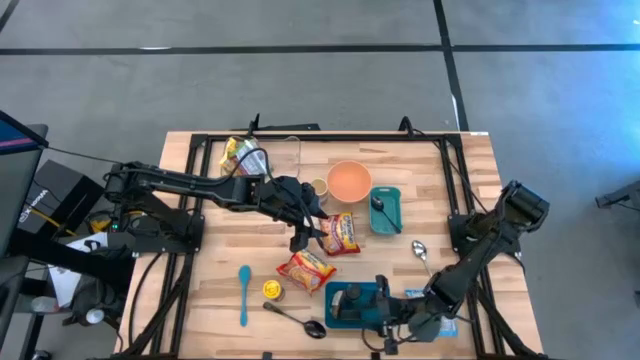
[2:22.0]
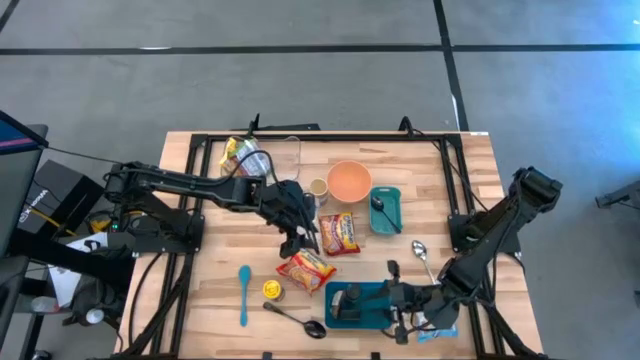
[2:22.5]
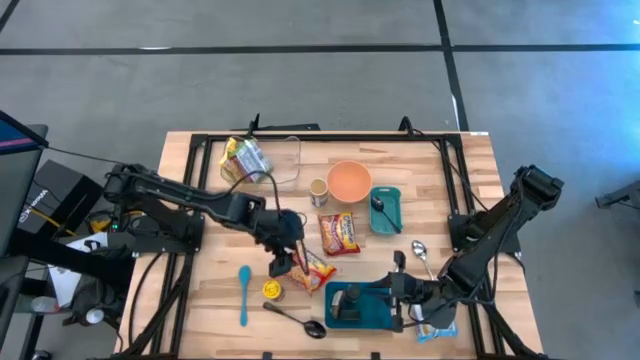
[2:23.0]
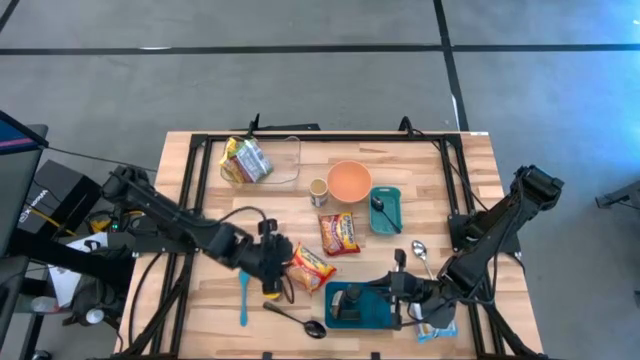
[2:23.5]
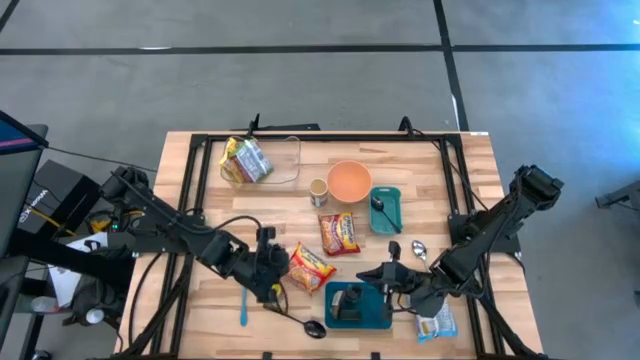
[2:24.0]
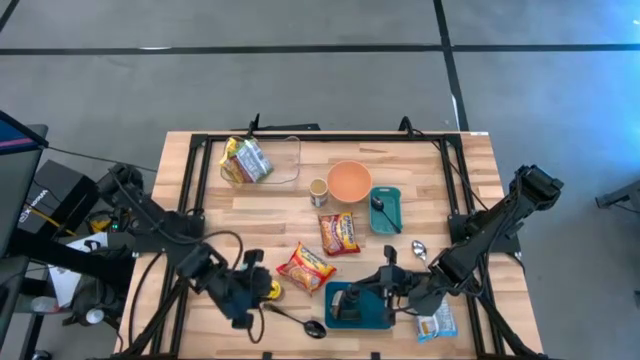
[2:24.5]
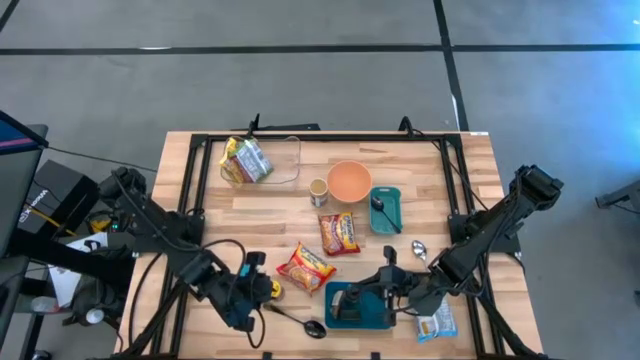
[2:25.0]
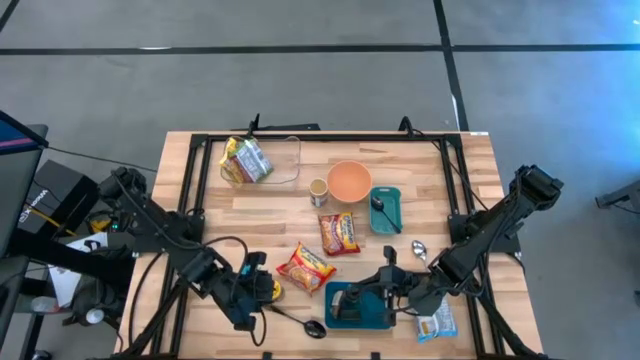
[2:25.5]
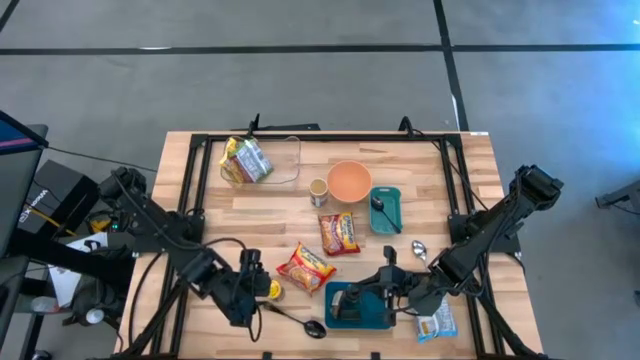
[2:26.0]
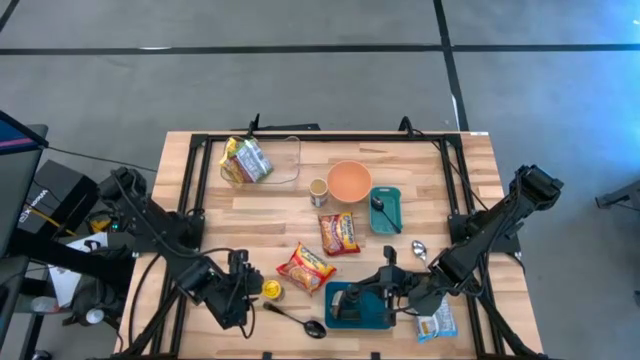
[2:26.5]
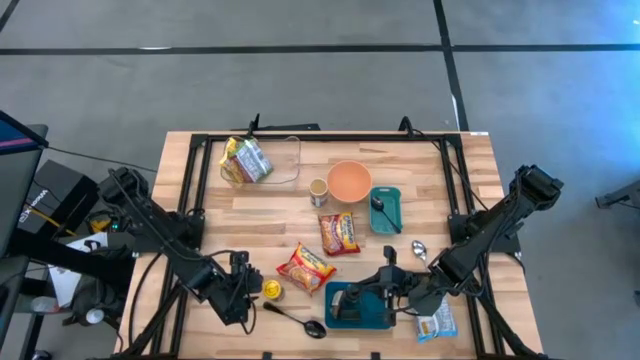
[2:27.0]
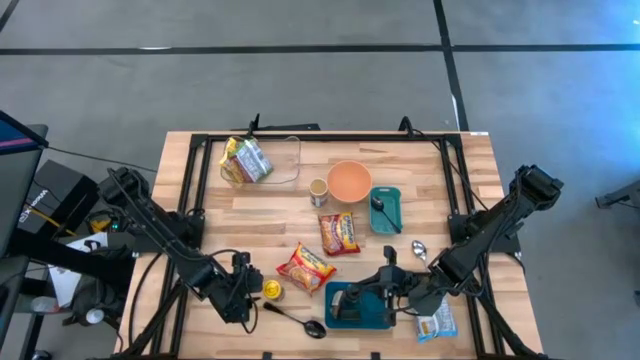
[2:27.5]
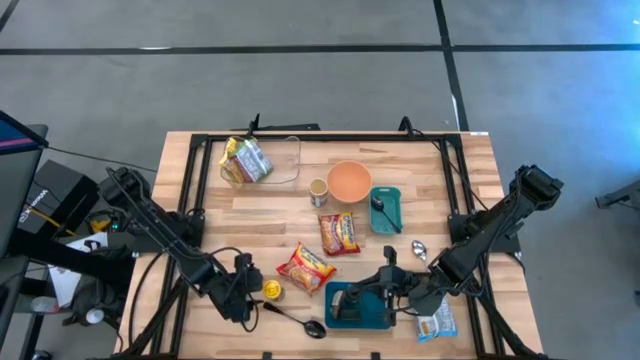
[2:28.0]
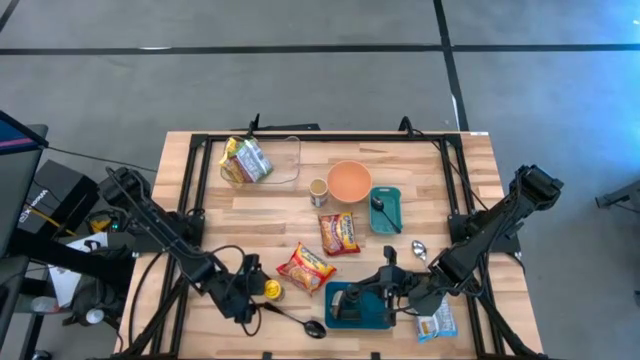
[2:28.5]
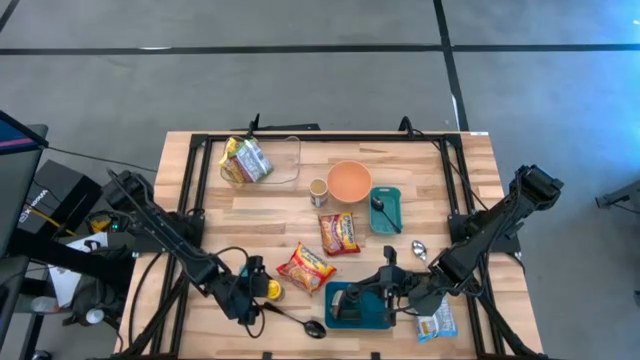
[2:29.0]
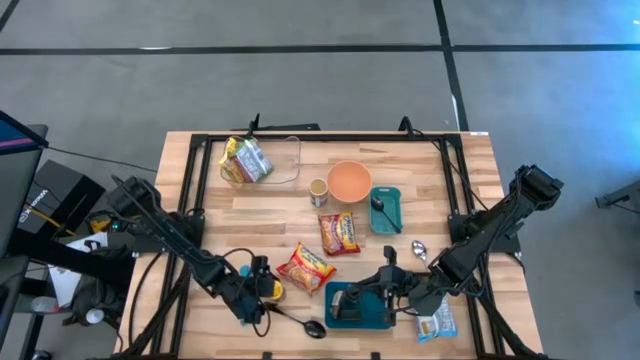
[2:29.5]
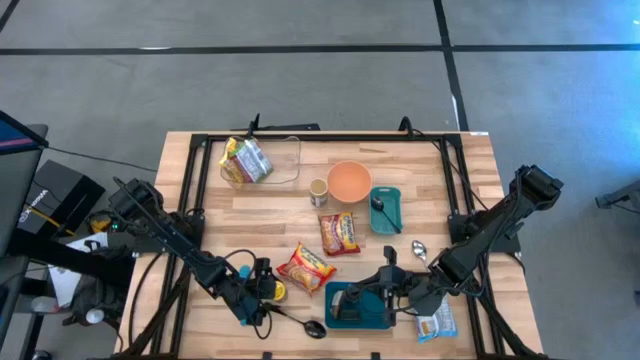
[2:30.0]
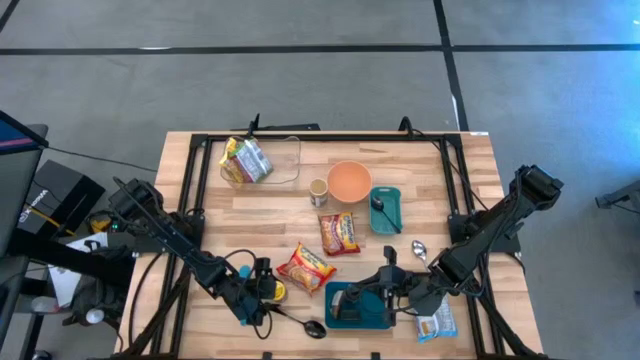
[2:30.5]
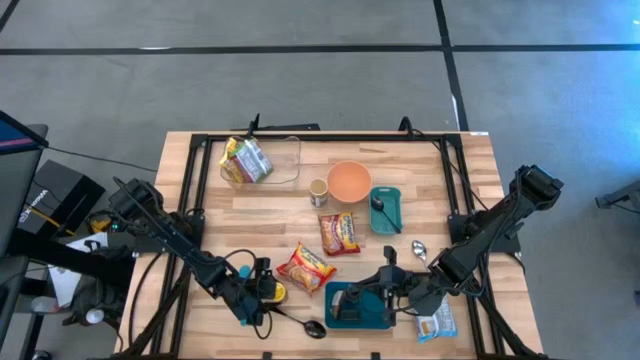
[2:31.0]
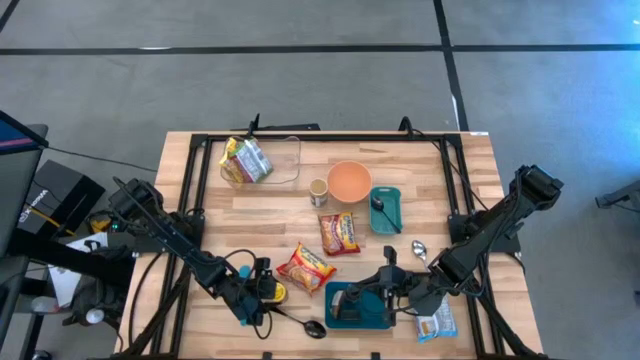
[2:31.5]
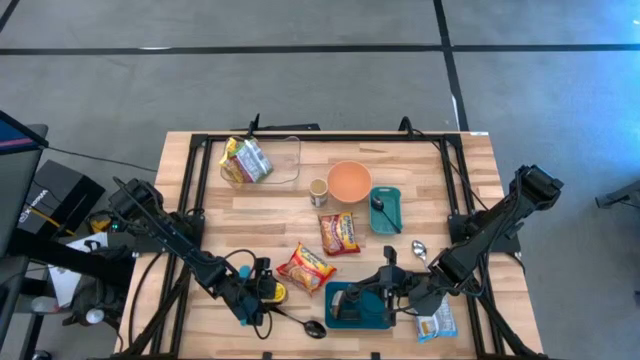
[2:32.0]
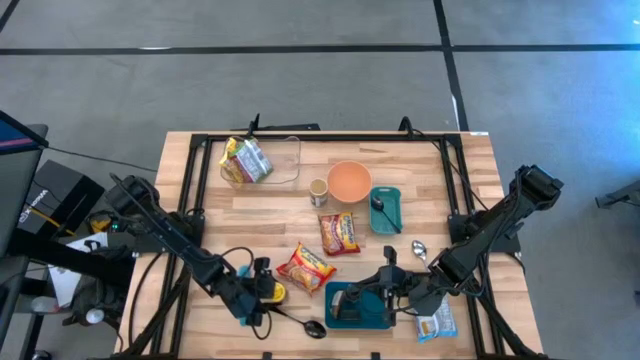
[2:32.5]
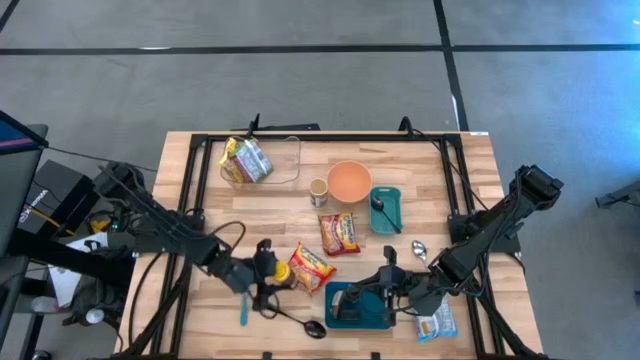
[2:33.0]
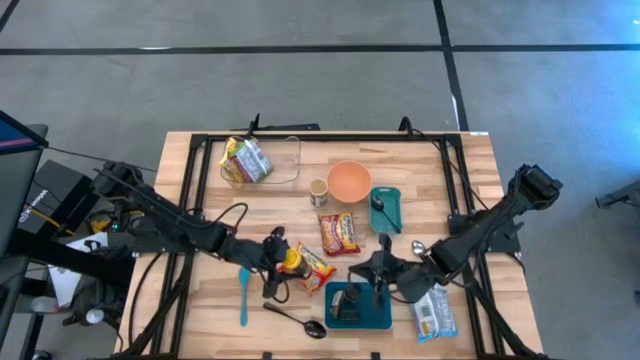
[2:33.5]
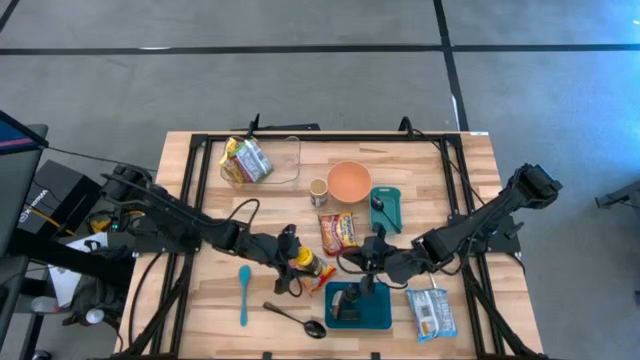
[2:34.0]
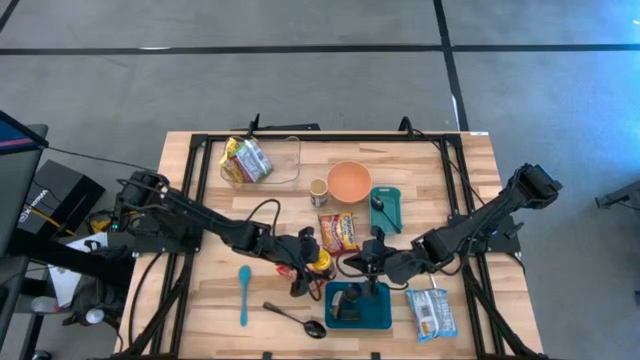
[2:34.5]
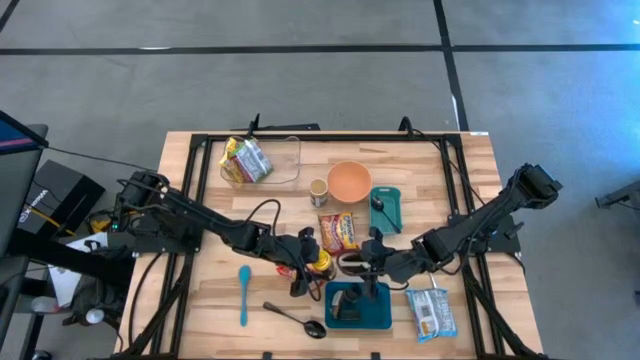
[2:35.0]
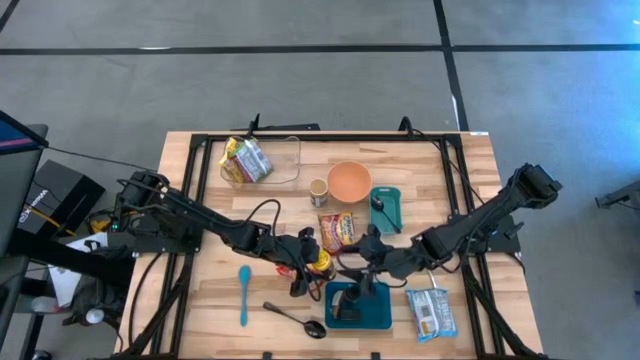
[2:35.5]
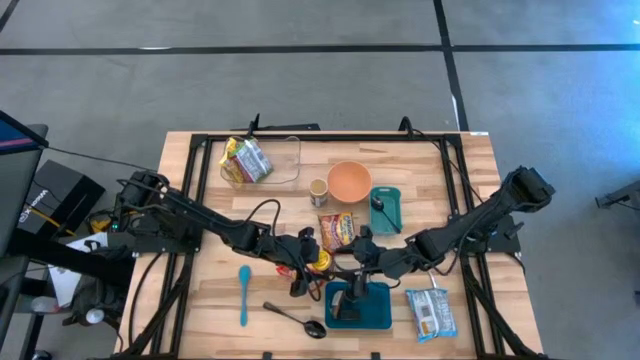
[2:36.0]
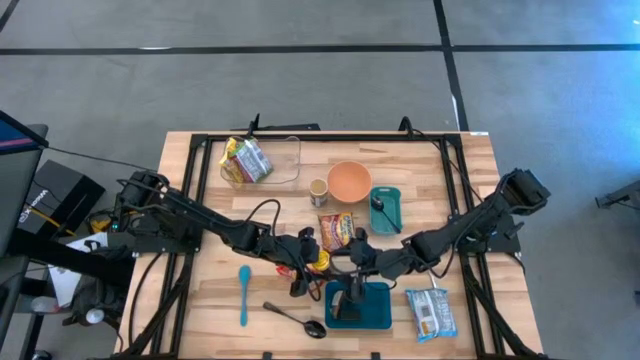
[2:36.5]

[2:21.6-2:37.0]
Task: Pick & Place Food Item
Put the yellow seasoning bottle into the blue bin

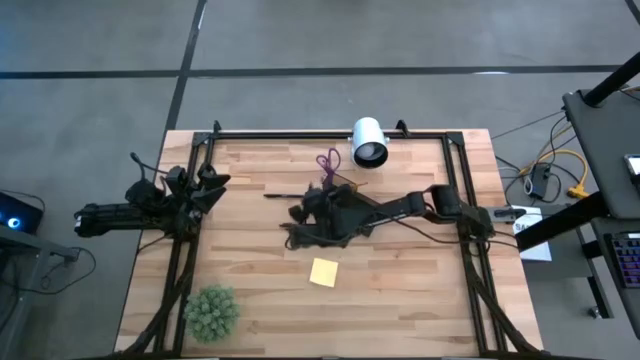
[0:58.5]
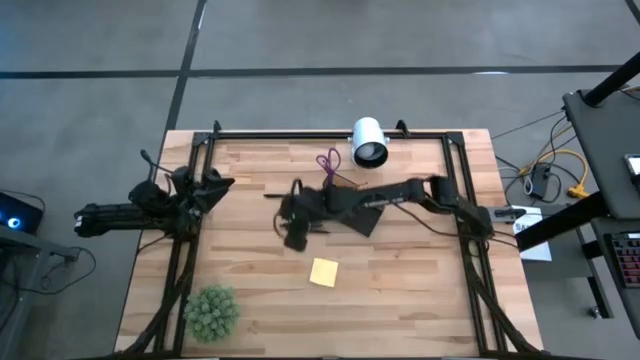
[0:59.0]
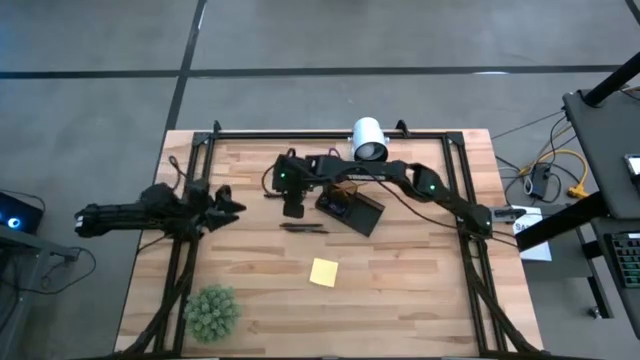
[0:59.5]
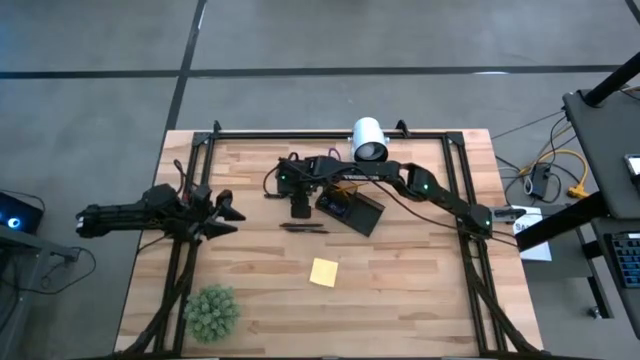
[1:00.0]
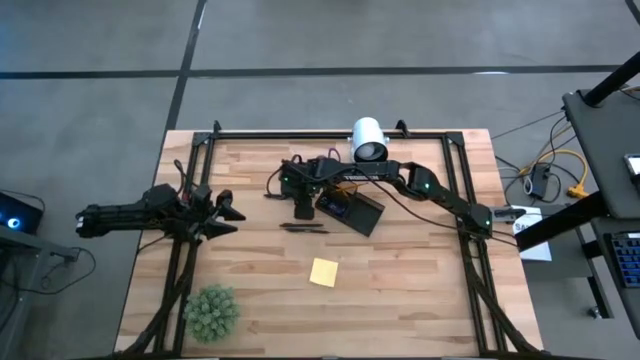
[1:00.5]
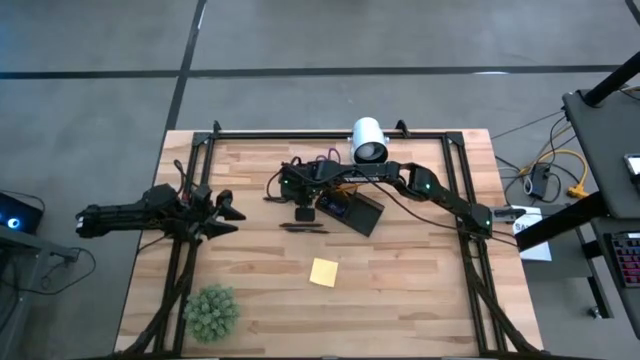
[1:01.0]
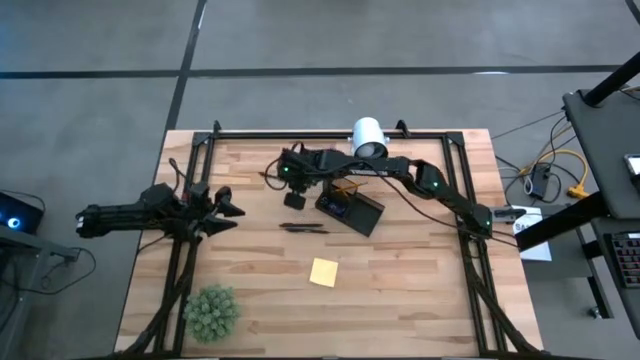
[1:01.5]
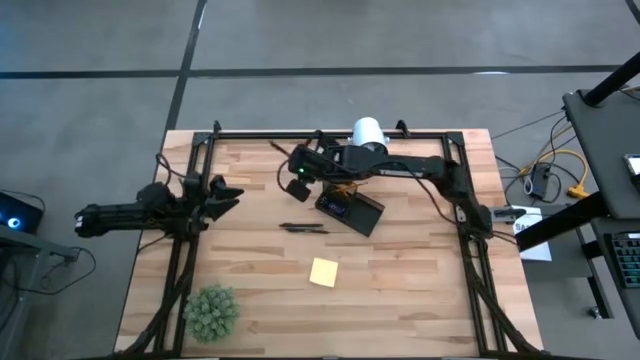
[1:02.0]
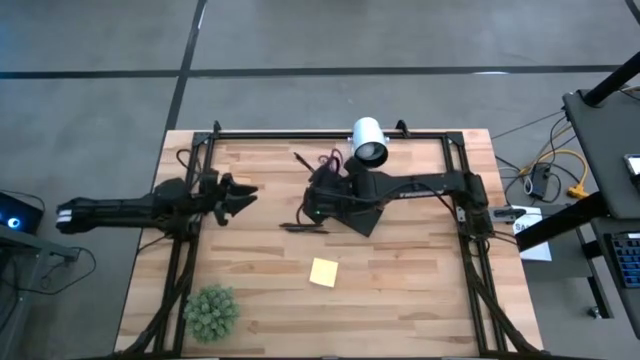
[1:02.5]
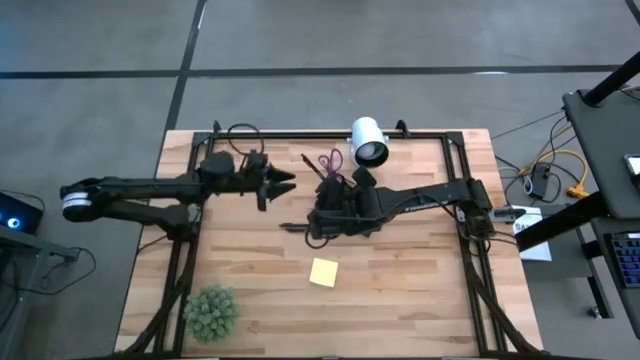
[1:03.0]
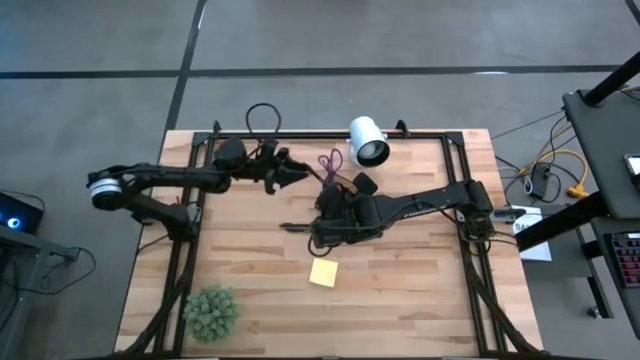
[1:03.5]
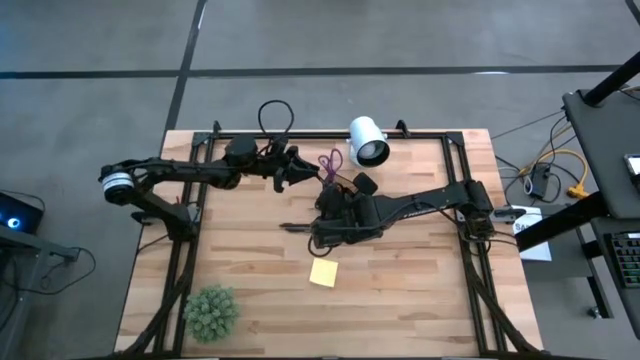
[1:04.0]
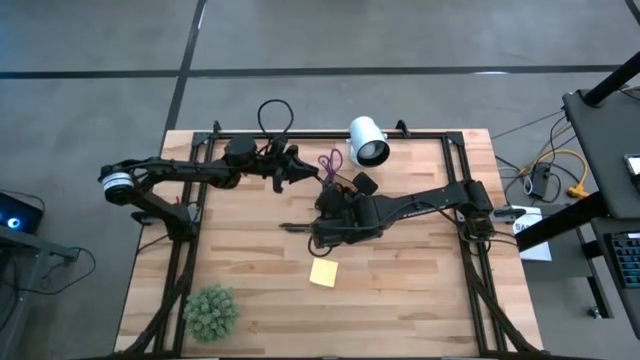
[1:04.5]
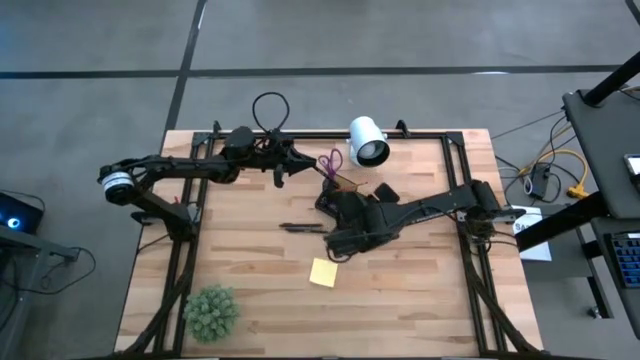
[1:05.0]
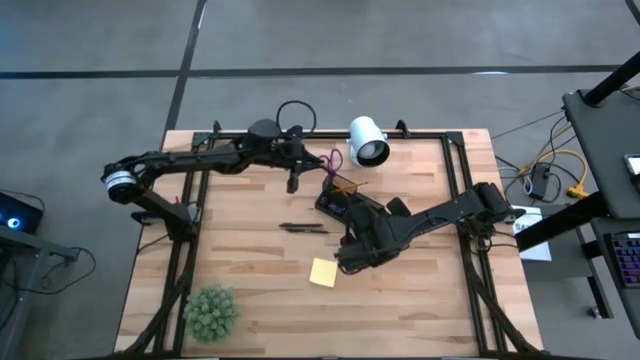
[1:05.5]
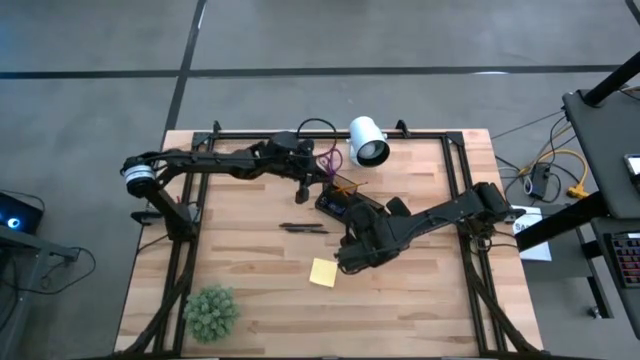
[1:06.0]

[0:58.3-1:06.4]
Task: Pick and place office supplies into organizer
Put the top black pen into the black mesh organizer
